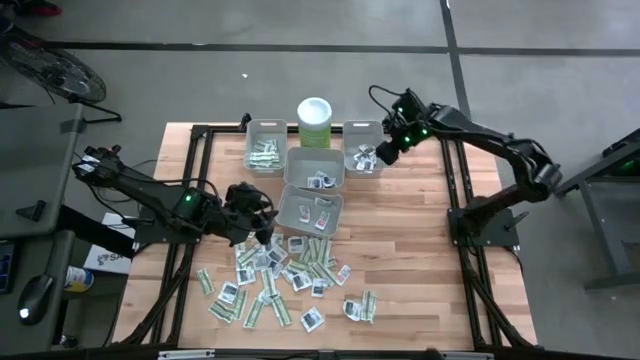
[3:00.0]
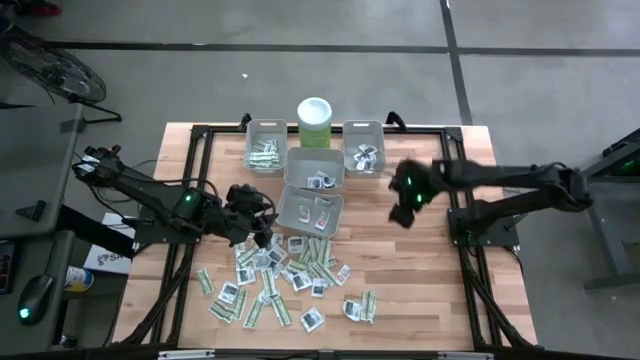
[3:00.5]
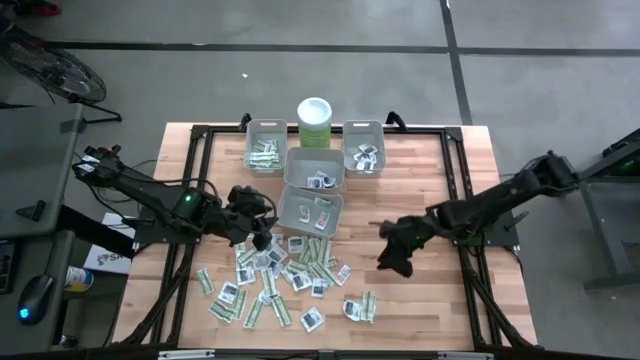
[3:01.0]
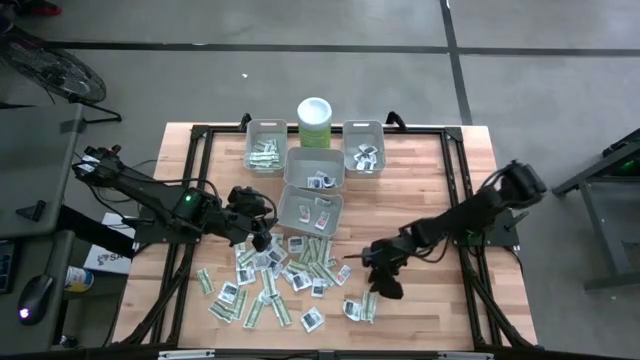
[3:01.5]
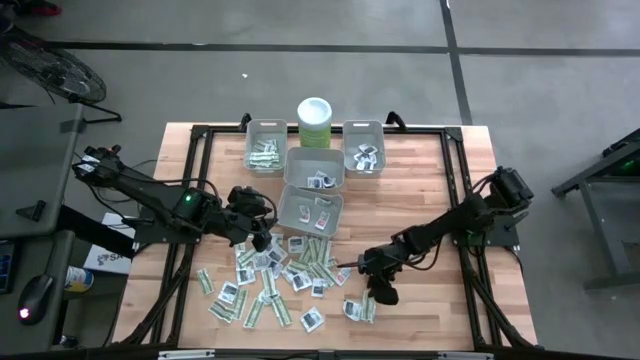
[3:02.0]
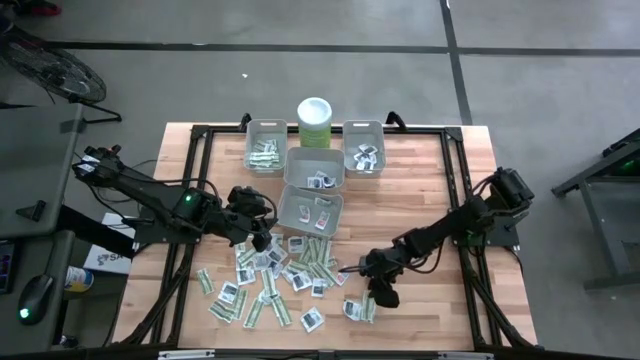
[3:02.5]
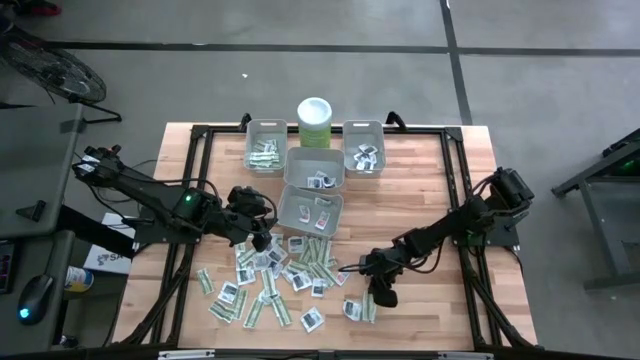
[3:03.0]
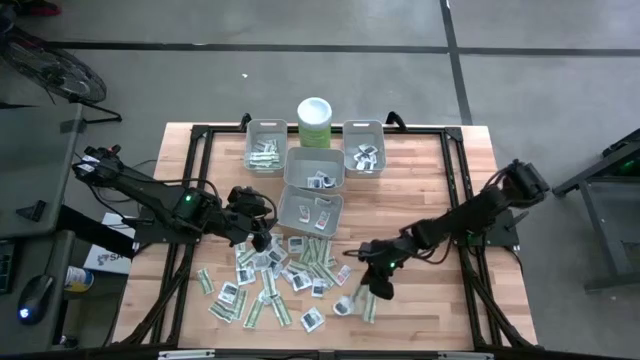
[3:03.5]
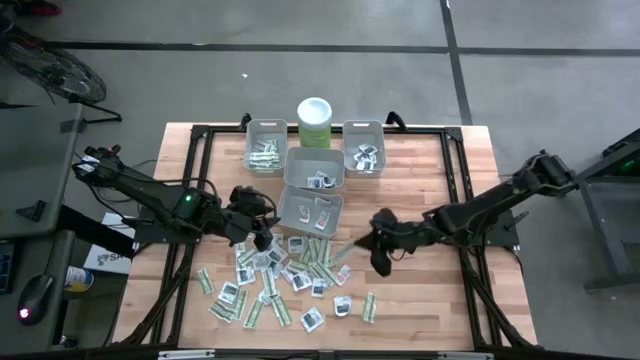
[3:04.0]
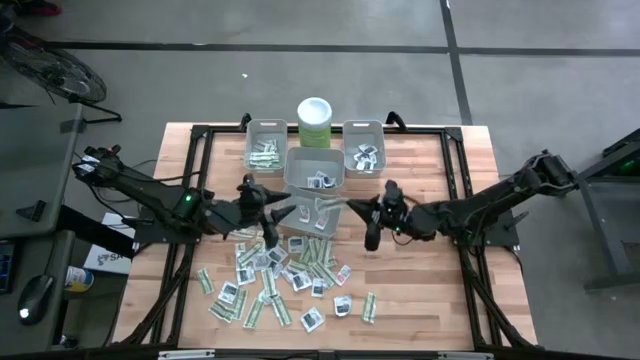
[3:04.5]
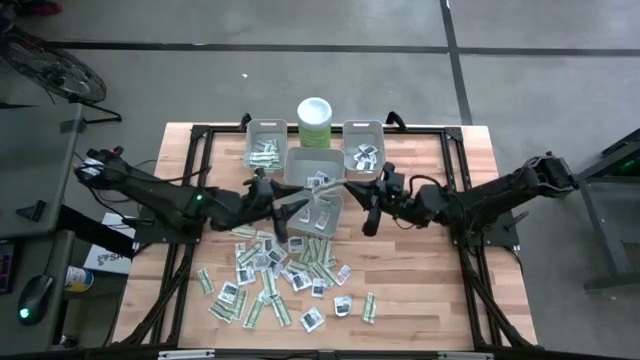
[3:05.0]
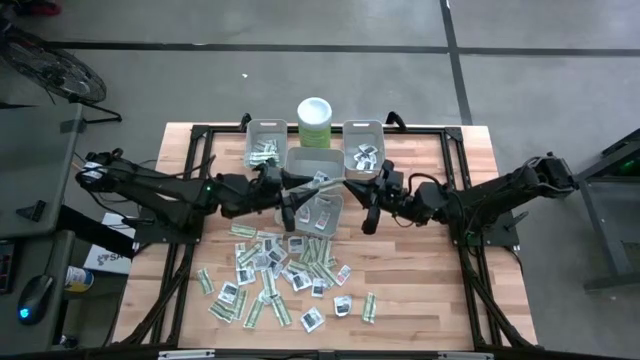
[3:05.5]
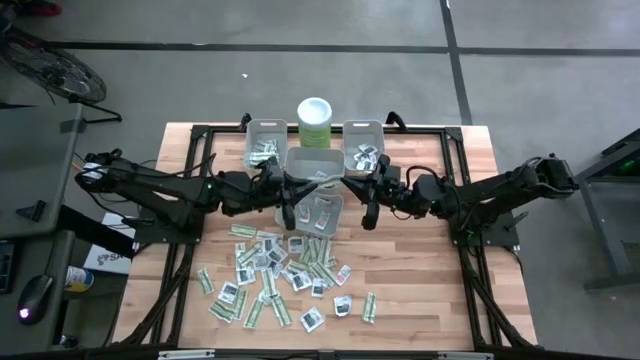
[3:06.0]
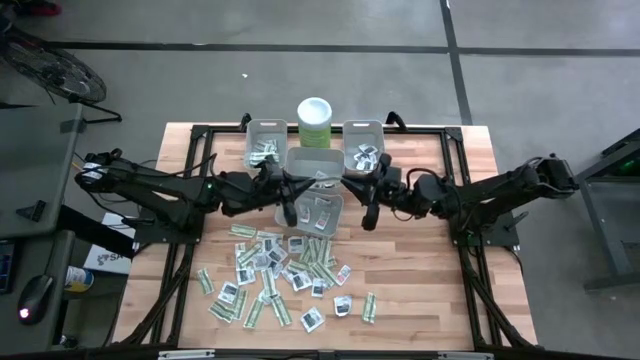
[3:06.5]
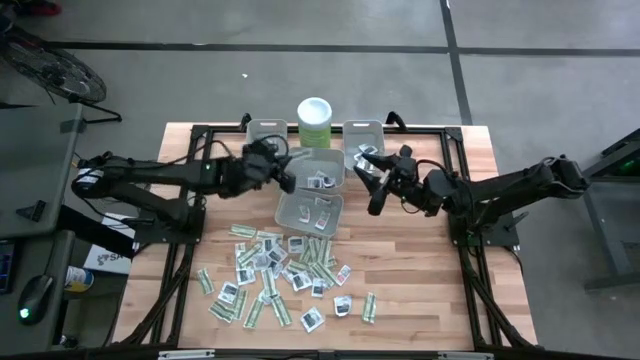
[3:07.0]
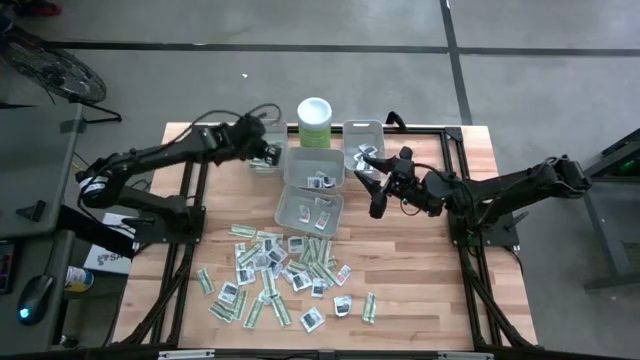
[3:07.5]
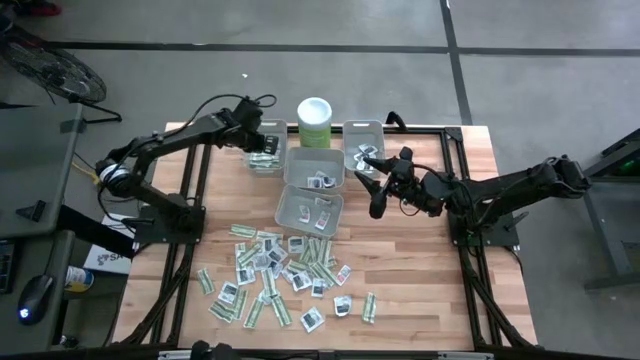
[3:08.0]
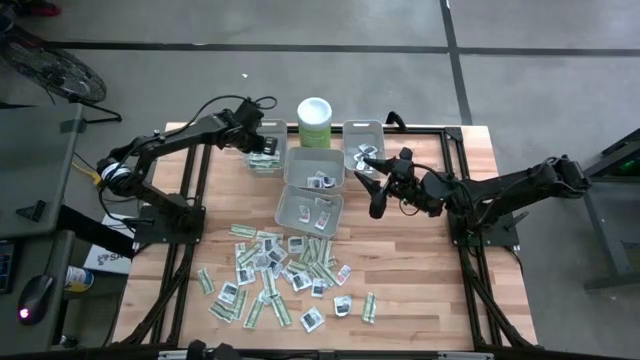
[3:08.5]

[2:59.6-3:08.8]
Task: Pick & Place First Aid Supplies
Put the bandage pack into the left bin

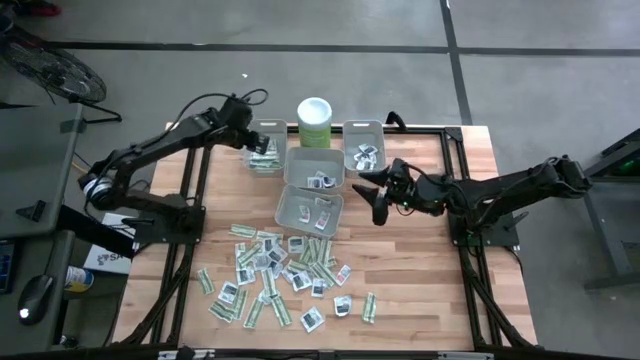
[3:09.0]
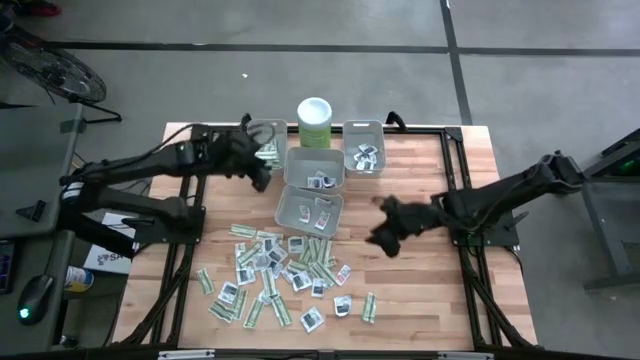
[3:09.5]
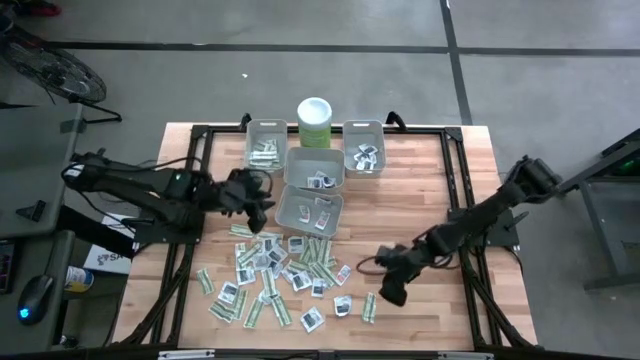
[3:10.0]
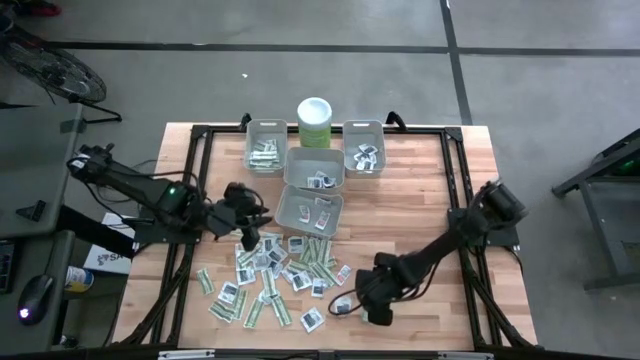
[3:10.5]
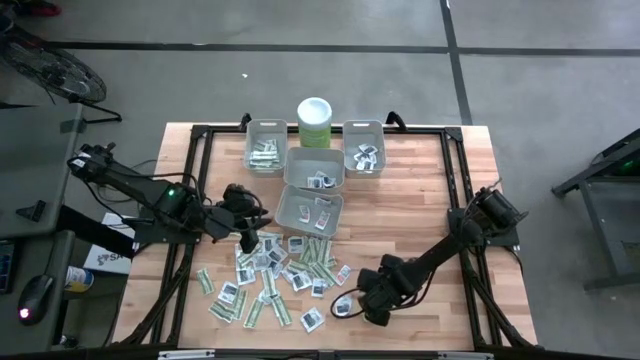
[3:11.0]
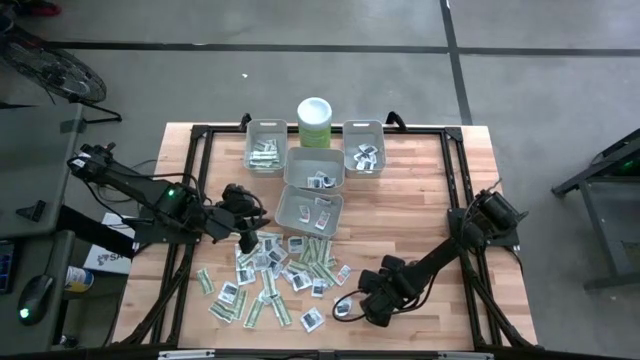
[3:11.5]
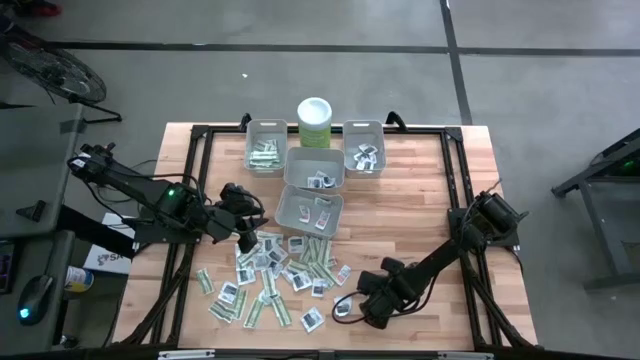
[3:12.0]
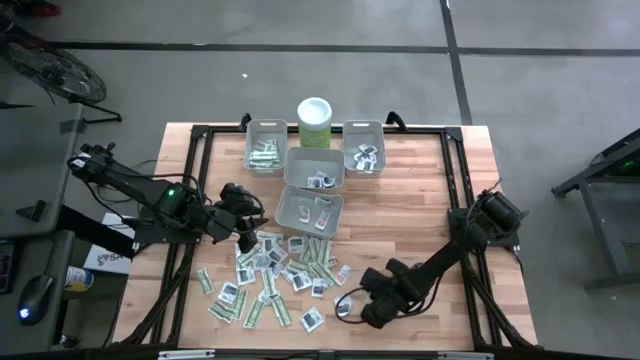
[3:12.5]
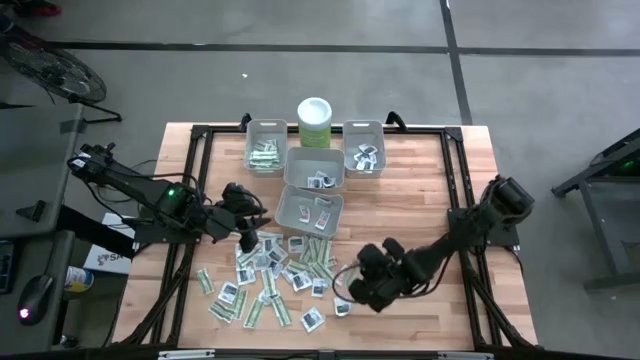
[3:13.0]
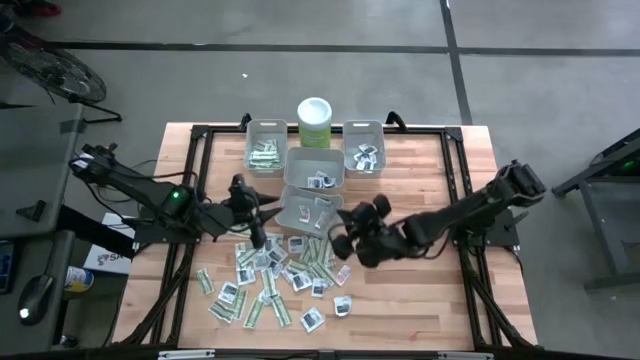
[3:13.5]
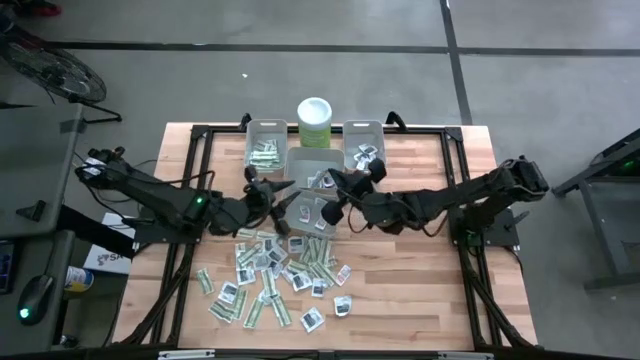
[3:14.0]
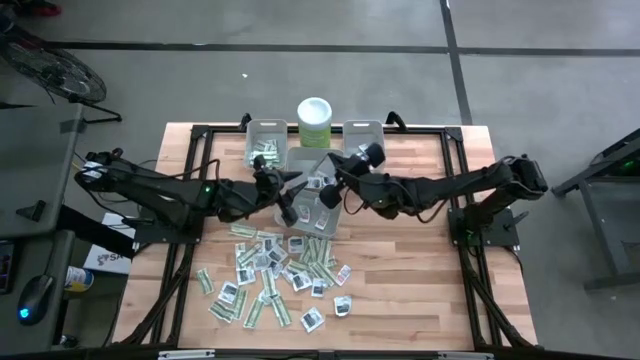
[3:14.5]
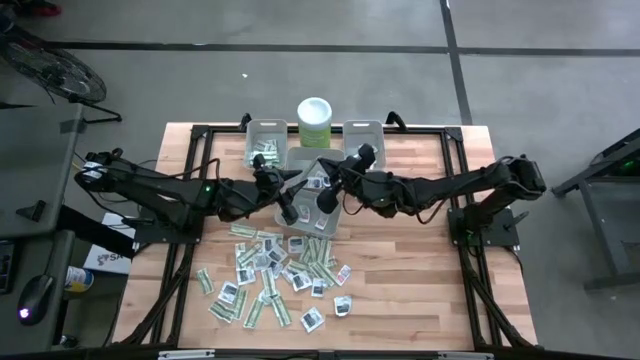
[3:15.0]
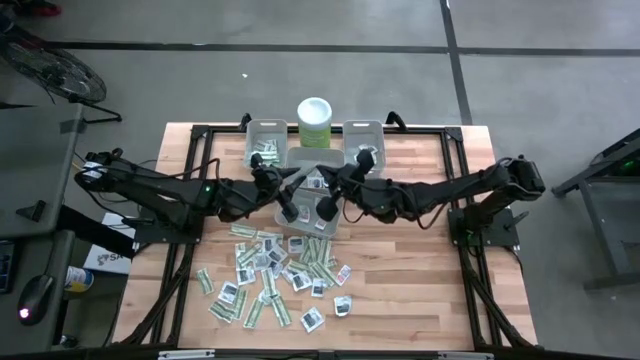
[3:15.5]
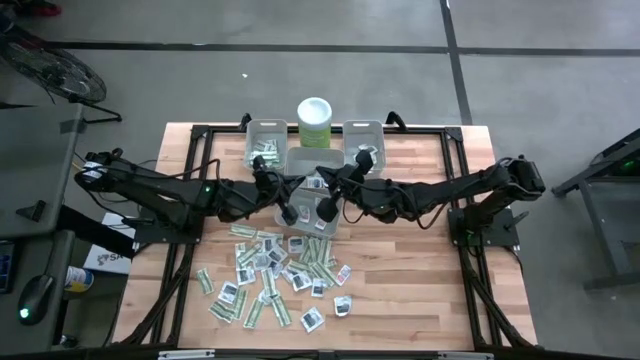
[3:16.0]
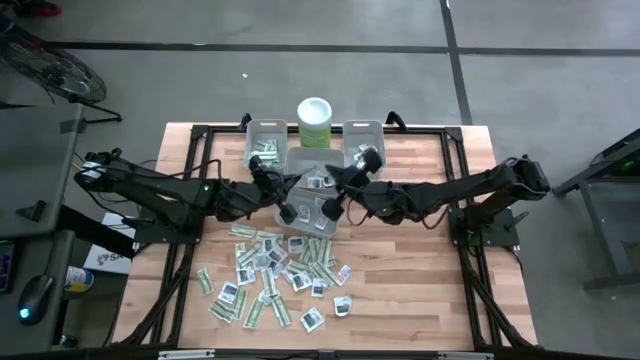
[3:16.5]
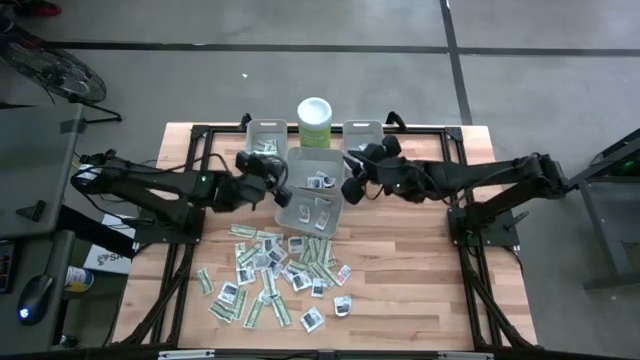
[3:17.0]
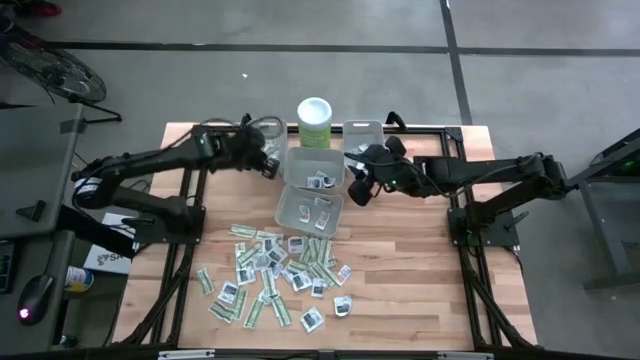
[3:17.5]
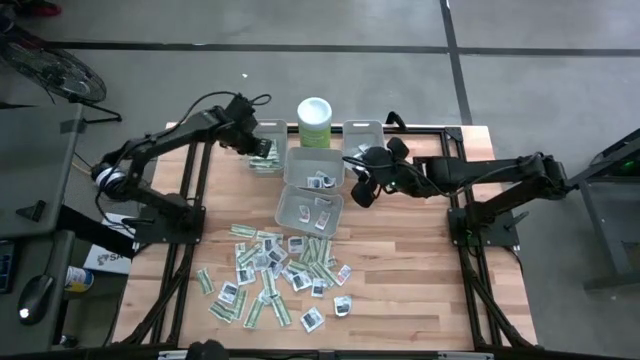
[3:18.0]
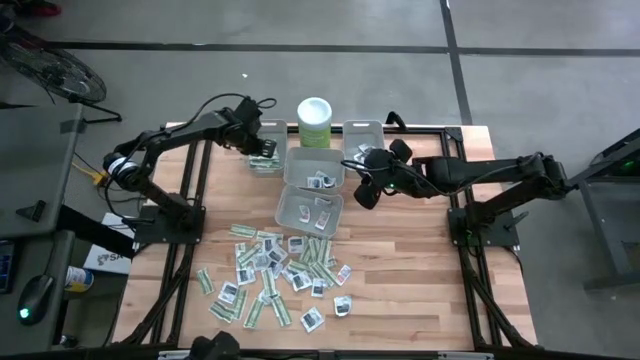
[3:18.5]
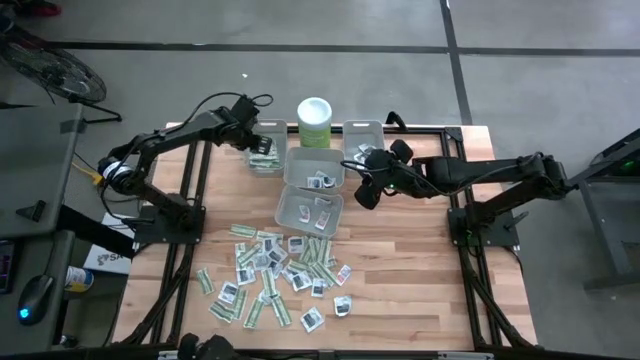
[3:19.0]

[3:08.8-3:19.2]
Put the bandage pack into the left bin

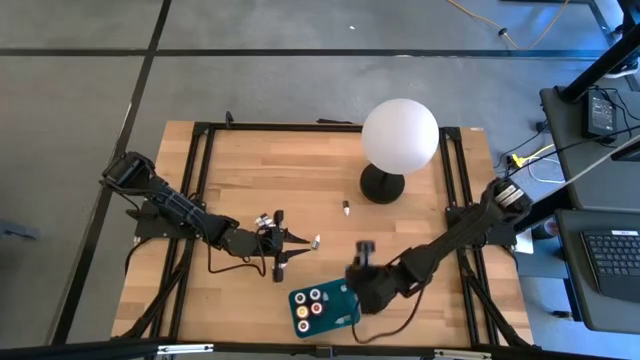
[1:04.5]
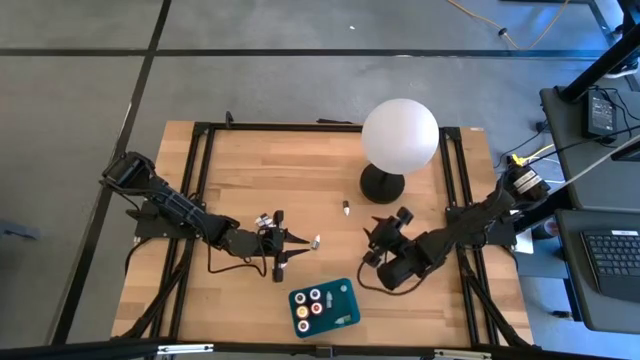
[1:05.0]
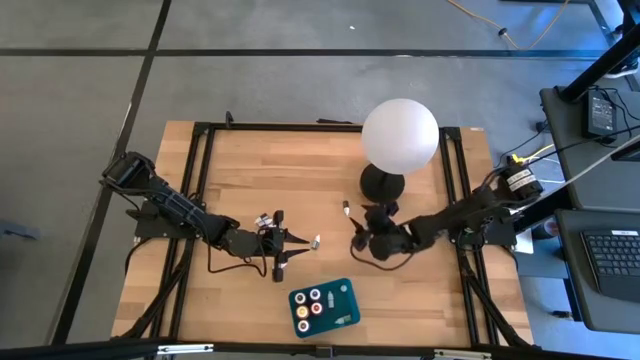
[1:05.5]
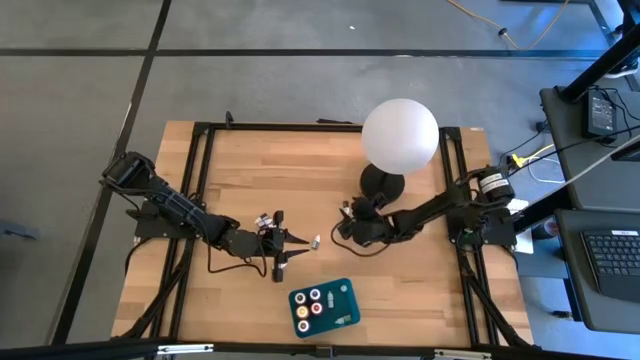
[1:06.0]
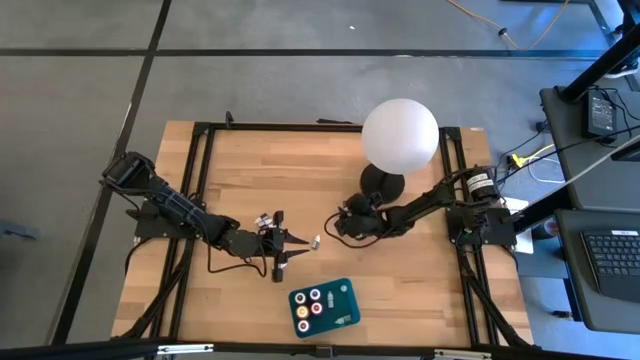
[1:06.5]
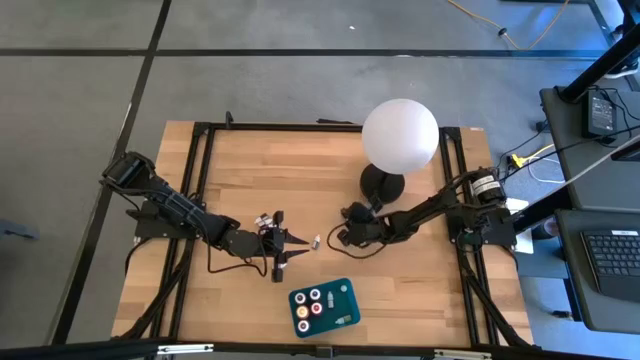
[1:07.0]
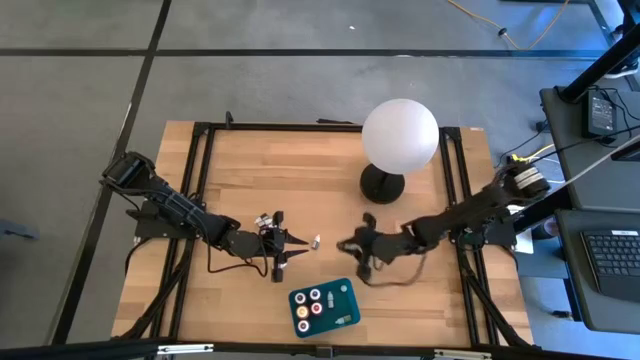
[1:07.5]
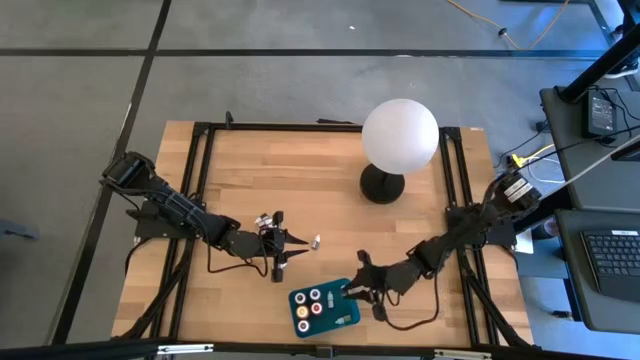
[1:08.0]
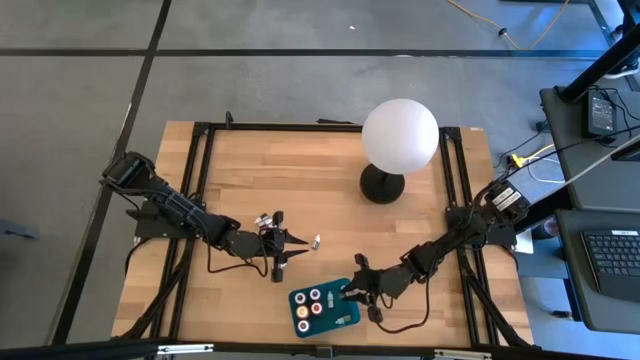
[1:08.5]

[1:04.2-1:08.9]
Task: Pick & Place food coloring
Put the small dark green food coloring bottle into the blue bin
